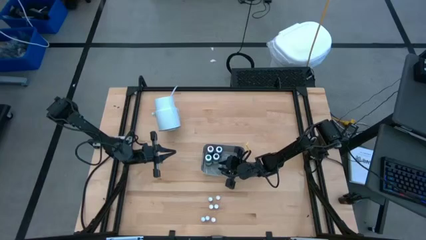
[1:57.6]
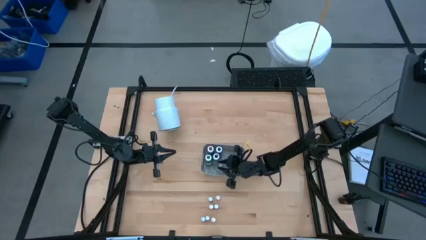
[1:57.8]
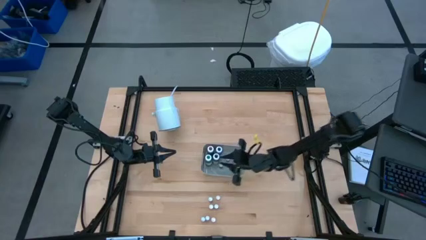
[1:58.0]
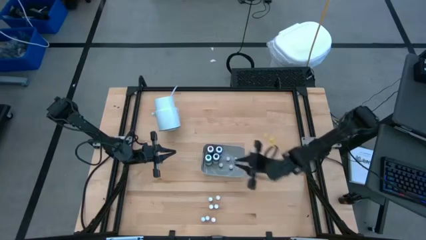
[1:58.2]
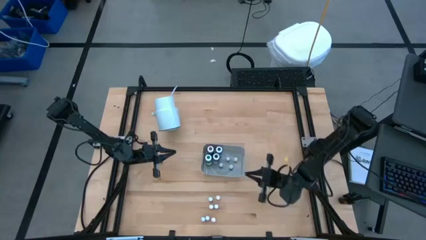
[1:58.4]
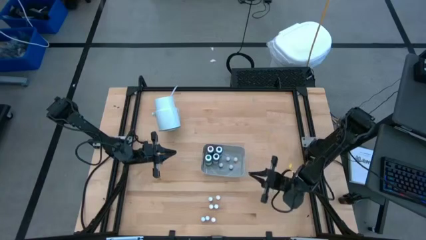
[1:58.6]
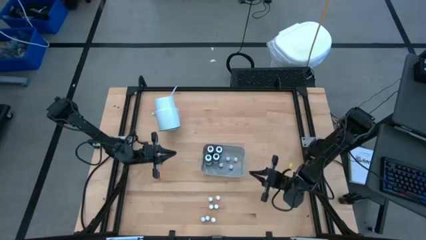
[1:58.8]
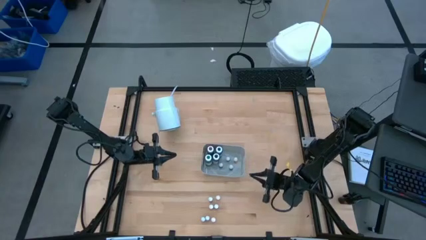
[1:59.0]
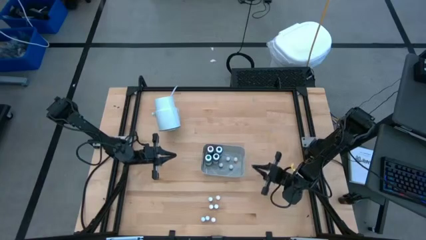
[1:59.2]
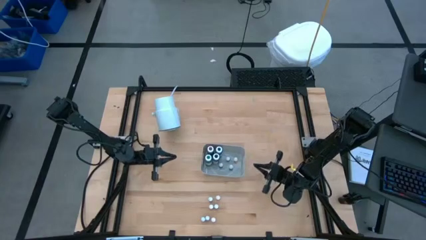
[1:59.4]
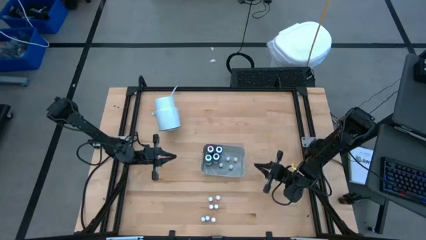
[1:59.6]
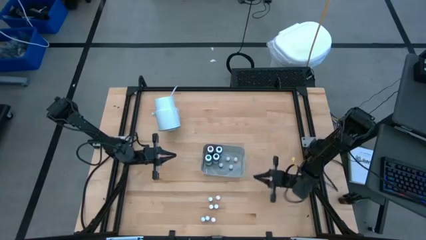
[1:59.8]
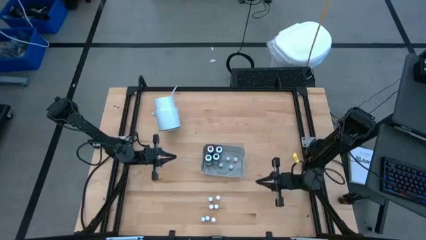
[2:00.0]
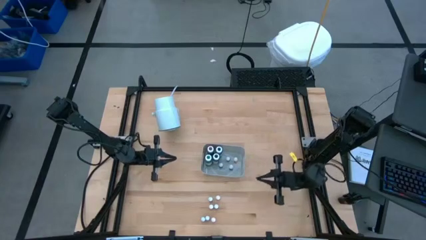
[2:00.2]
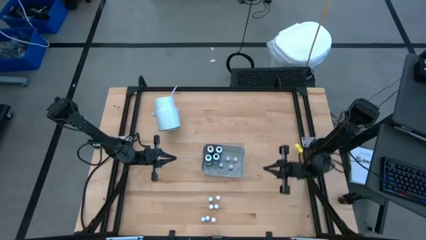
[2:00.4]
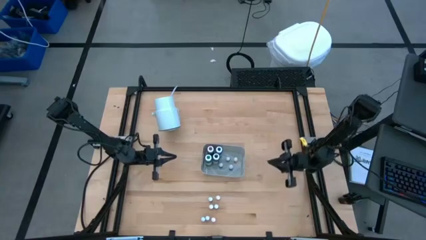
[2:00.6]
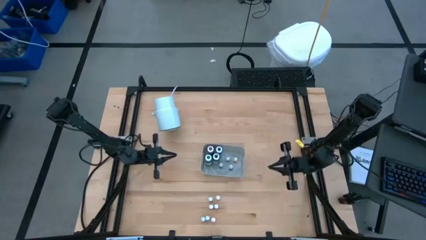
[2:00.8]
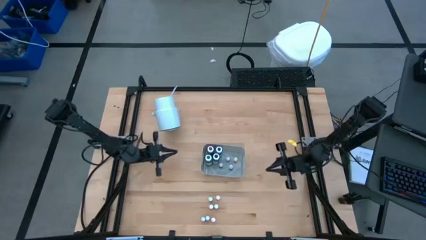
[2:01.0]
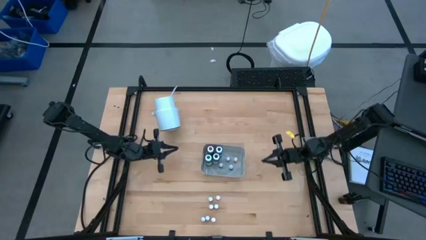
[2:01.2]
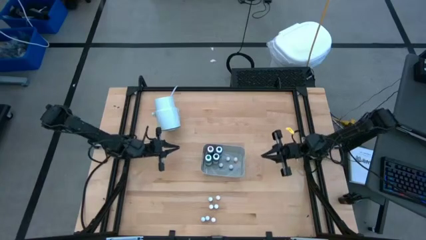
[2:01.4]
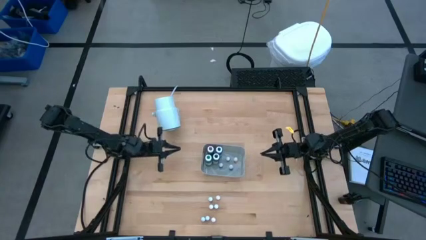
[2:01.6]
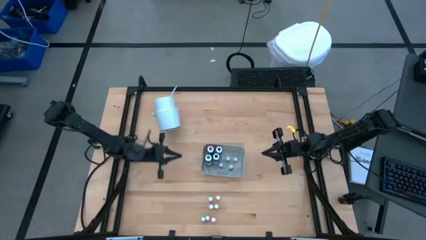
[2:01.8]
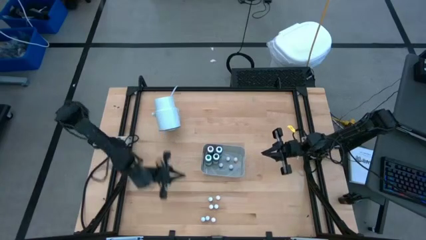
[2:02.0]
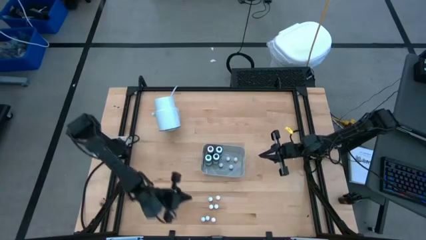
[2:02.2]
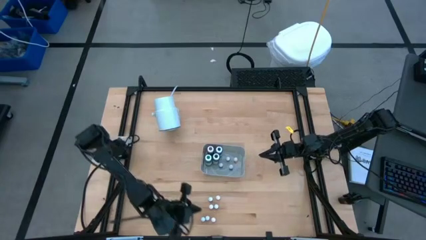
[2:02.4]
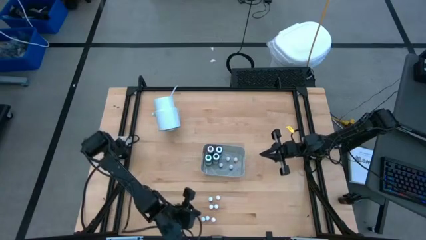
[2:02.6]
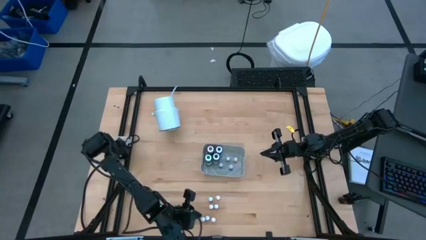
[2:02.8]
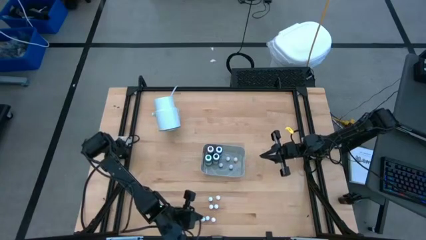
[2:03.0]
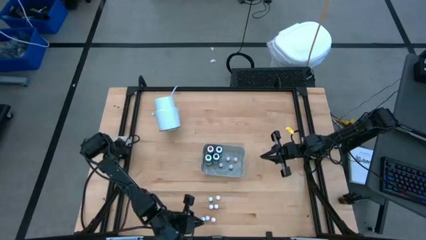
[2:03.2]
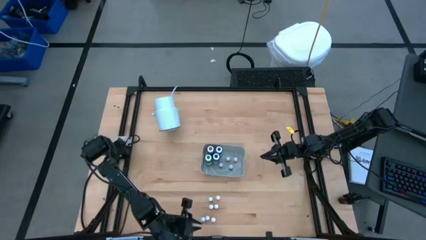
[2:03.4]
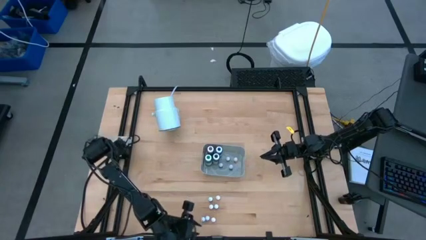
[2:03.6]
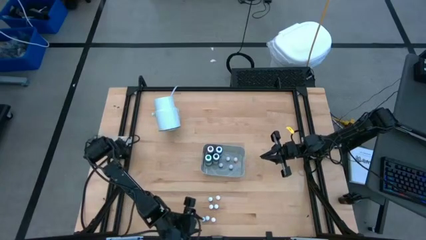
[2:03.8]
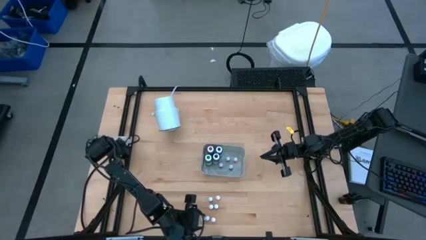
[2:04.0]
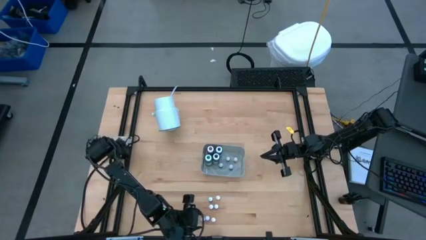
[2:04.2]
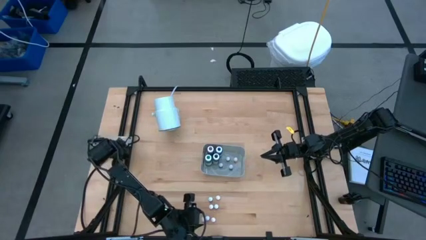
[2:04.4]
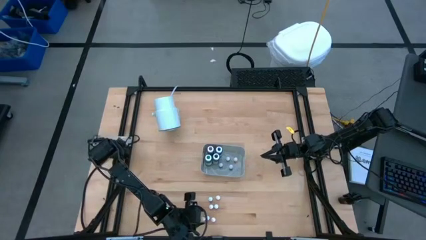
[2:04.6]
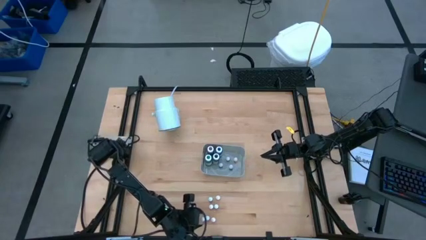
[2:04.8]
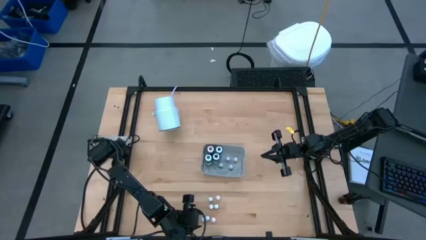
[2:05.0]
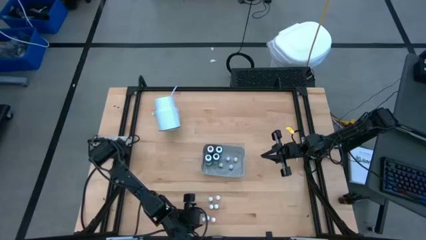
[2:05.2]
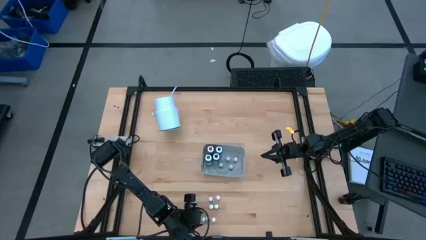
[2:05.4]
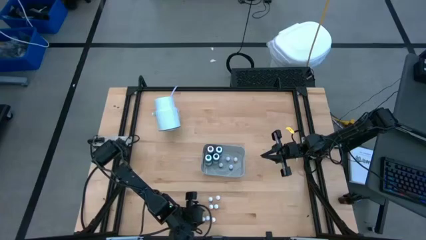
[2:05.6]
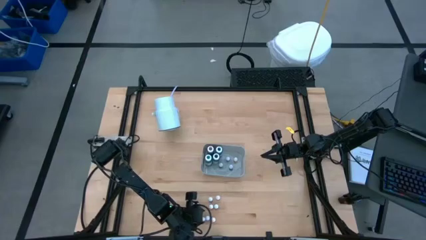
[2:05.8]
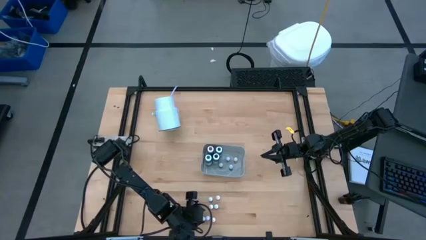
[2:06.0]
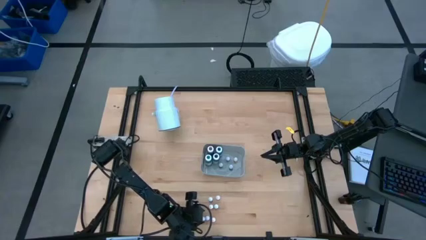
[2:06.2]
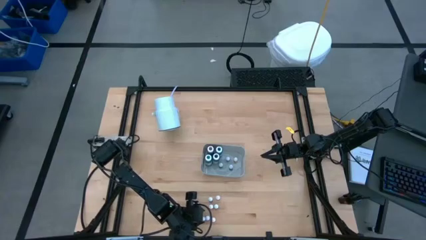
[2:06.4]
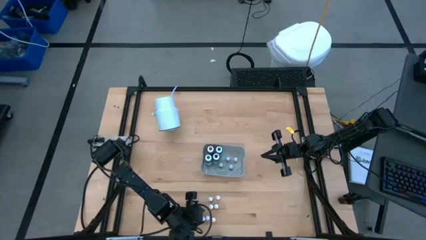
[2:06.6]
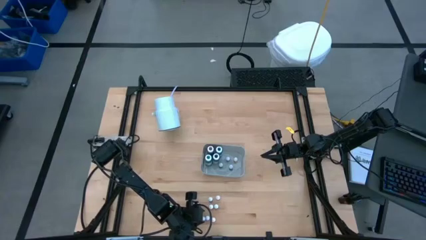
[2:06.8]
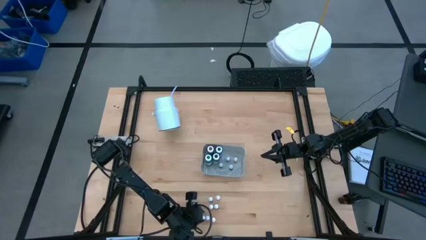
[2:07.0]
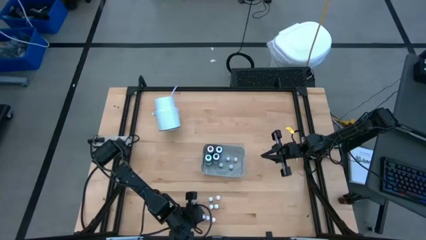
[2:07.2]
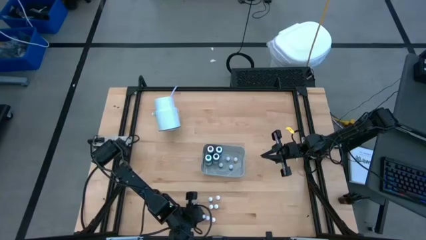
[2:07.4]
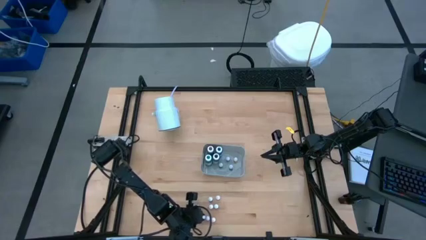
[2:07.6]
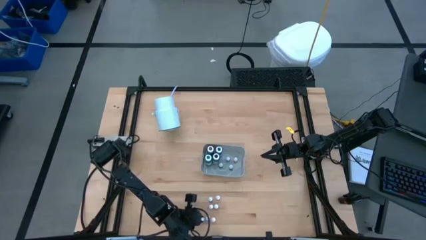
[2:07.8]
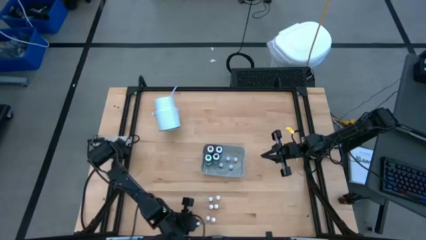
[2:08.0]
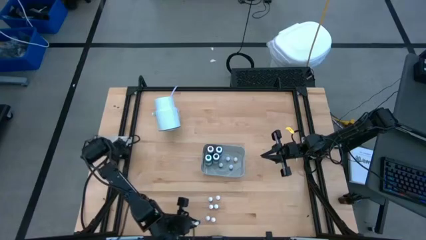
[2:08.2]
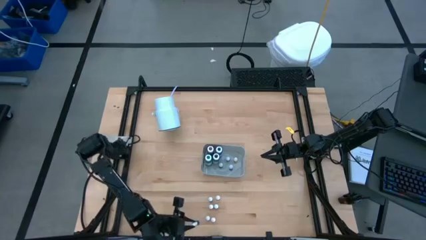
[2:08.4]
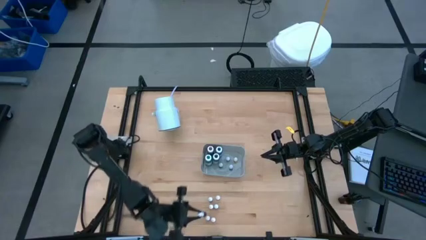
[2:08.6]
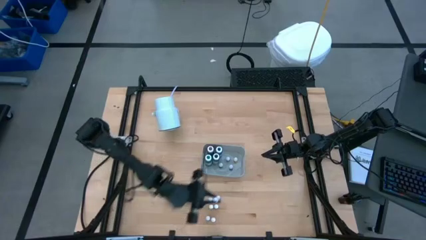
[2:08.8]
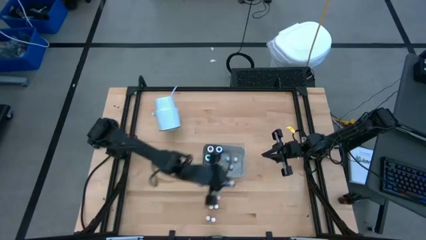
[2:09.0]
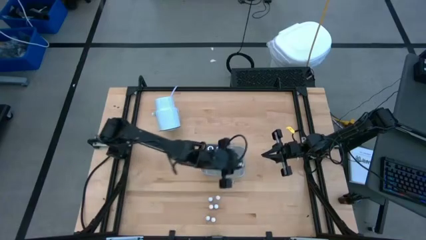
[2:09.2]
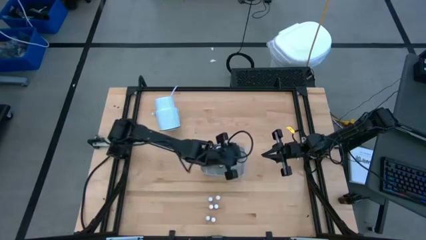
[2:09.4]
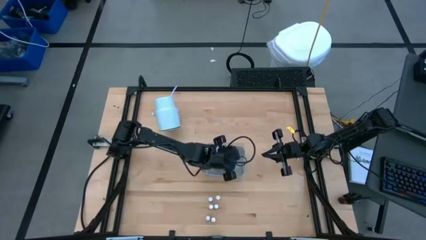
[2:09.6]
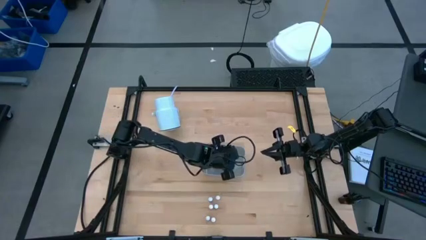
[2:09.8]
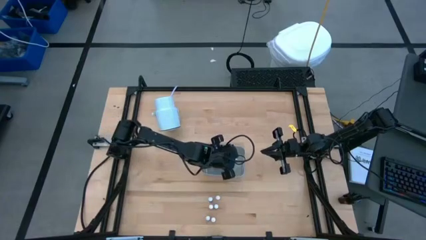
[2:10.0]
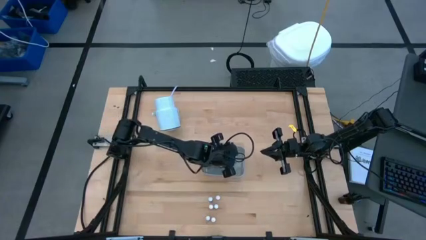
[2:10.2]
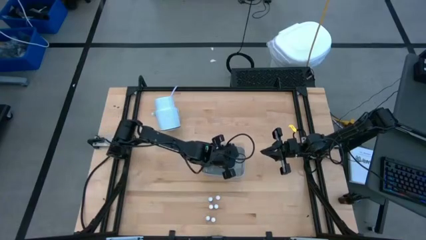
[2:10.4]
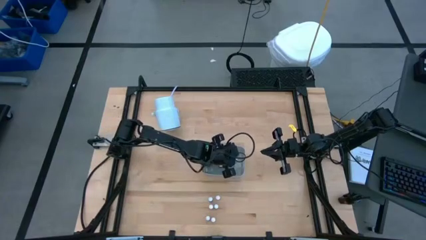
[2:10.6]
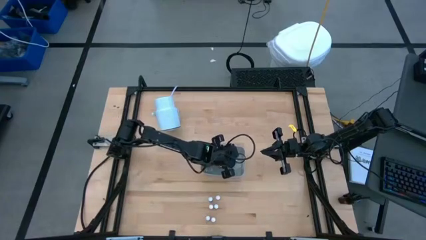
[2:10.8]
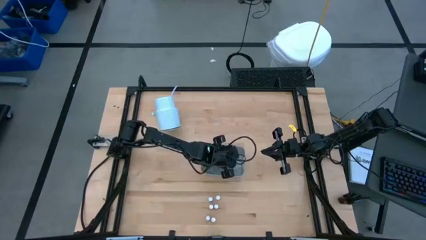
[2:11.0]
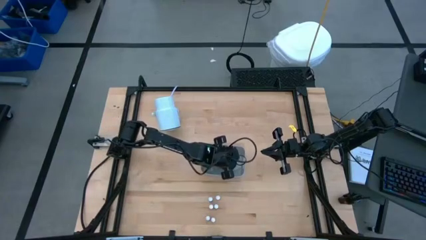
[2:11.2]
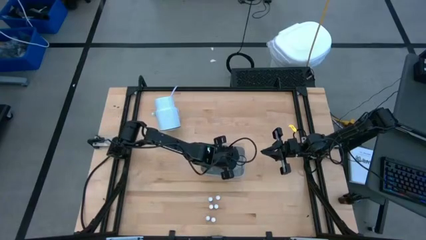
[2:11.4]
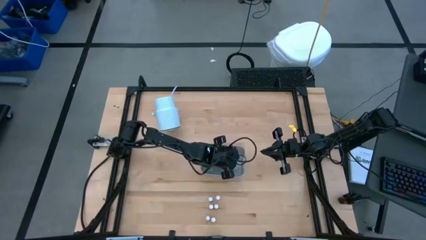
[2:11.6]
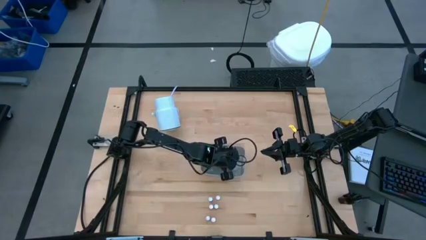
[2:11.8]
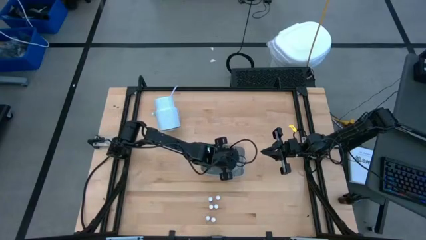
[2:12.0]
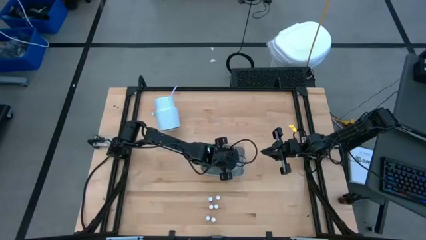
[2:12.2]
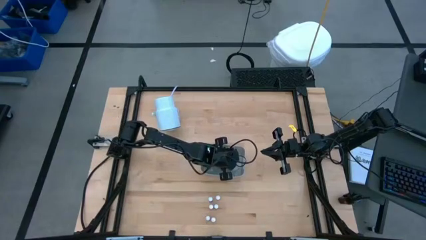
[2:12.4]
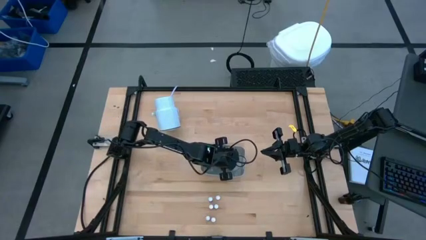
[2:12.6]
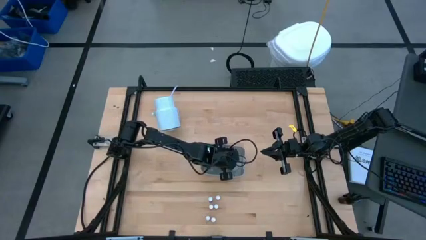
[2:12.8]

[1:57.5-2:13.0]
Task: Pick & Place food coloring
Put the small blue food coloring bottle into the bin

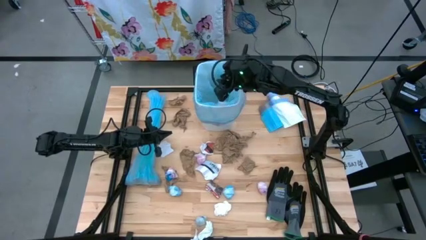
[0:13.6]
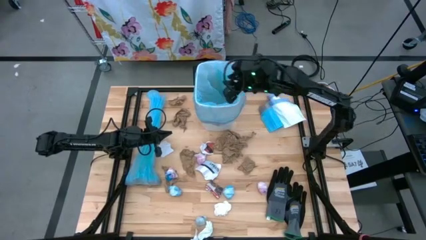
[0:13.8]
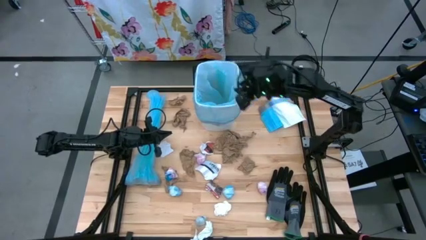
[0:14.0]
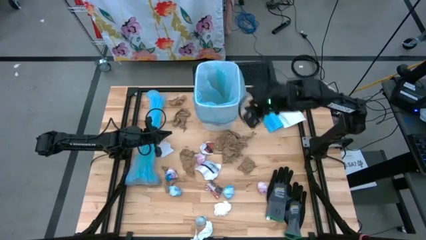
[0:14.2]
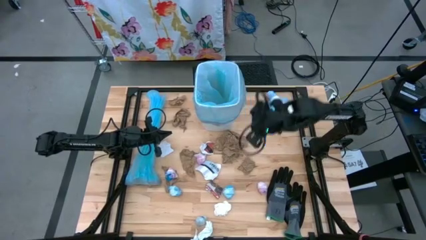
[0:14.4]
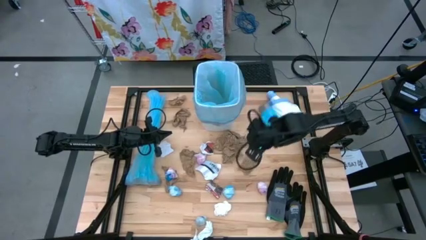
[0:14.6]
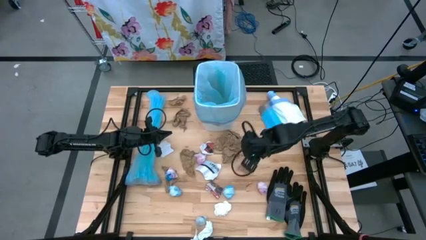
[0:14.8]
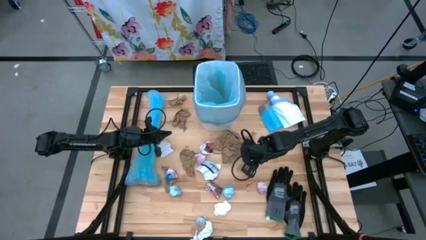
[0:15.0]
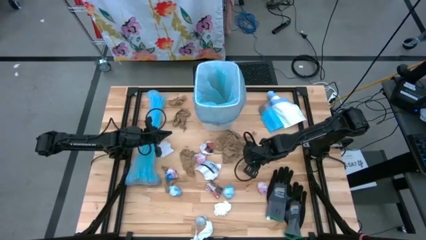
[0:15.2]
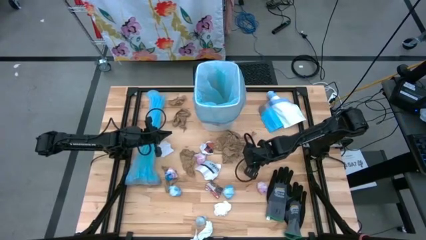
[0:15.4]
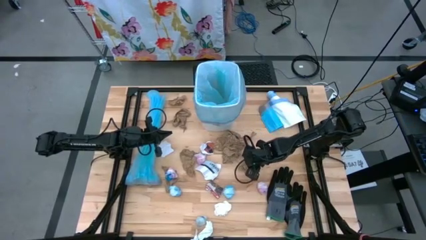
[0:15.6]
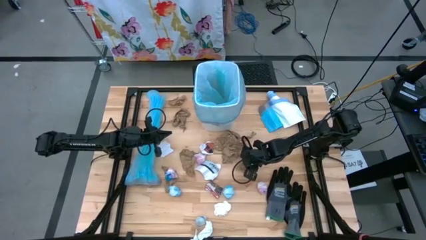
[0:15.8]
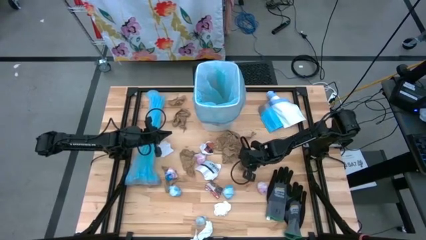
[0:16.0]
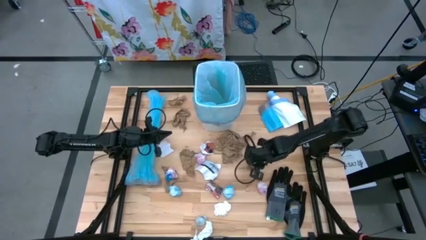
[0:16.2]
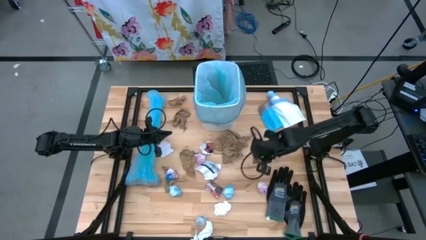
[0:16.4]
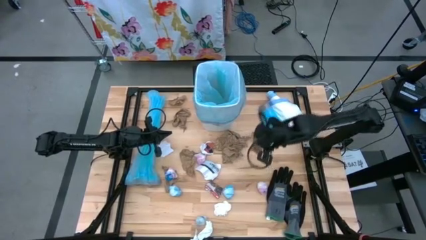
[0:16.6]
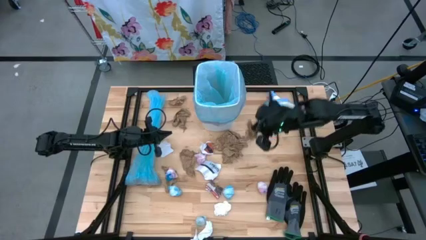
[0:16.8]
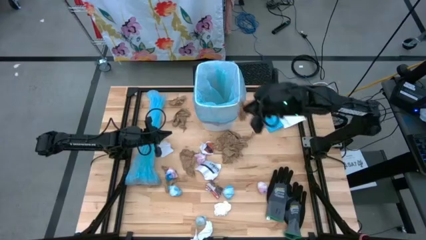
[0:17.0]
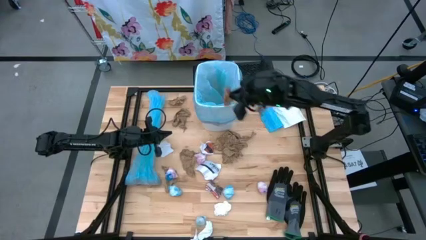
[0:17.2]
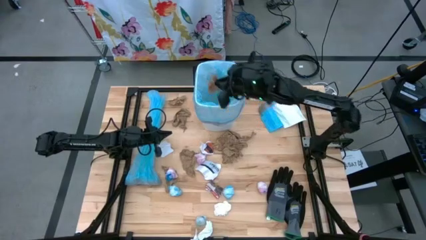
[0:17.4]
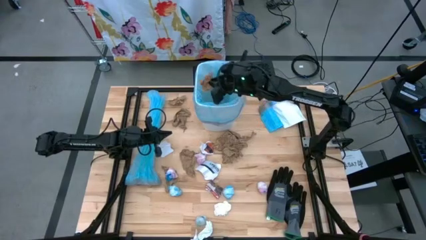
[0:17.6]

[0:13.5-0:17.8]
Task: place trash/remove bag and relplace
Put the brown paper into the blue trash bag inside the white trash bin
